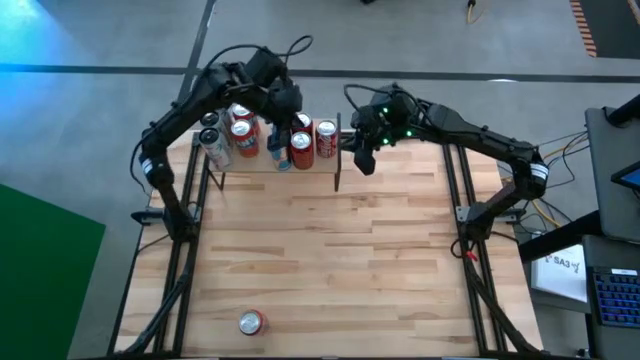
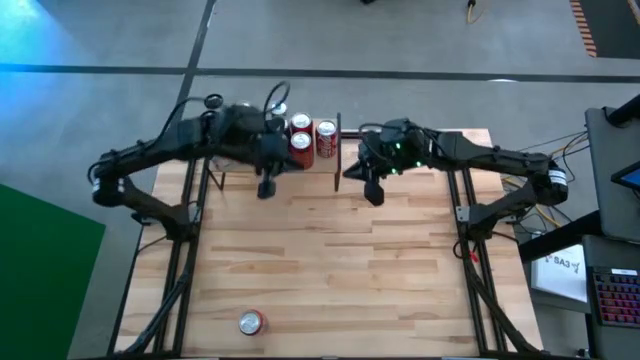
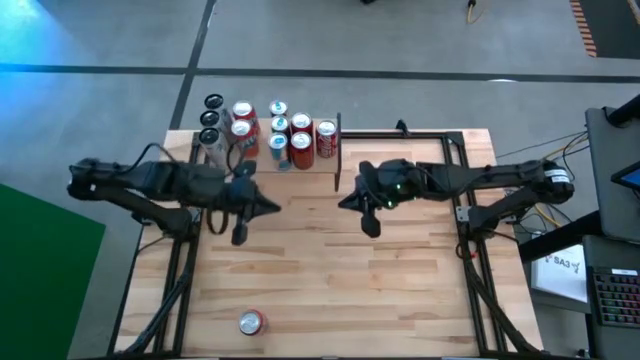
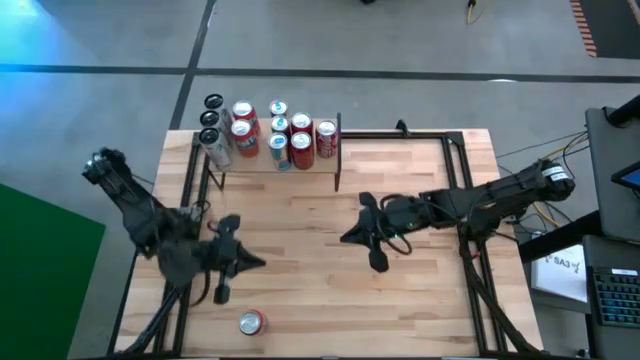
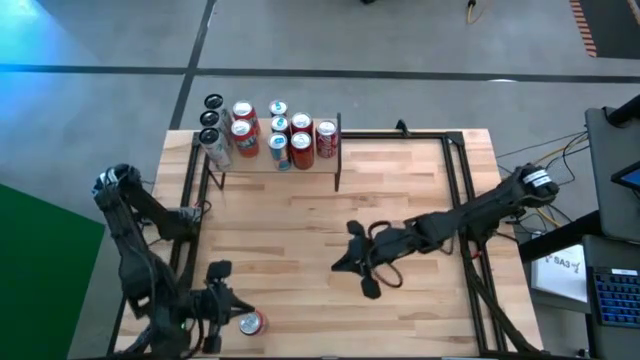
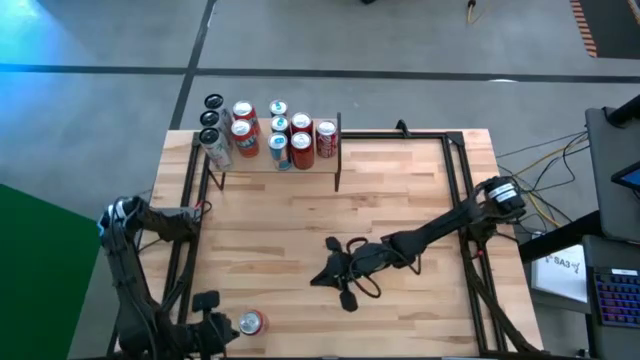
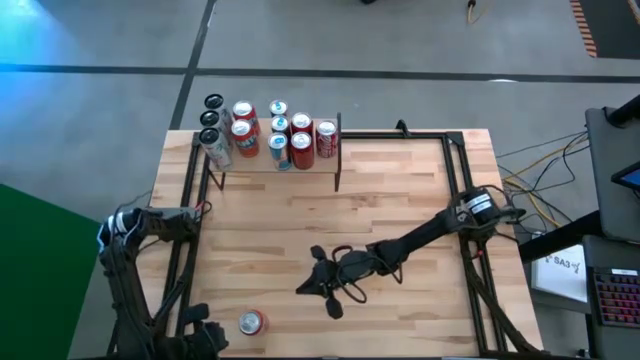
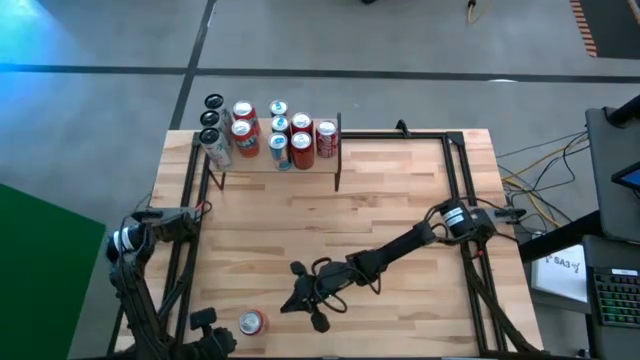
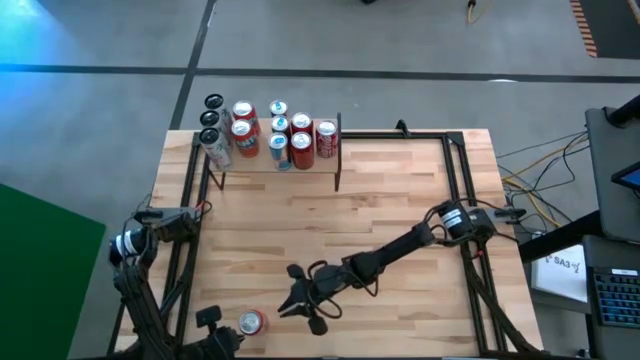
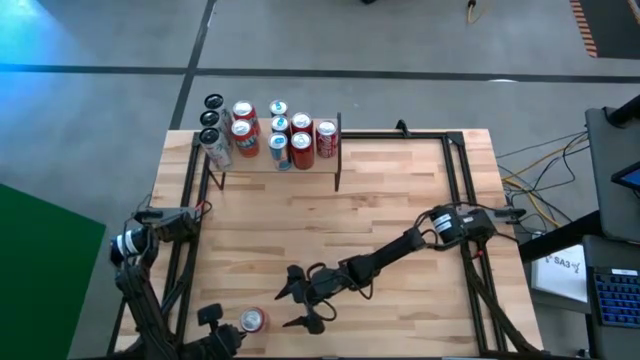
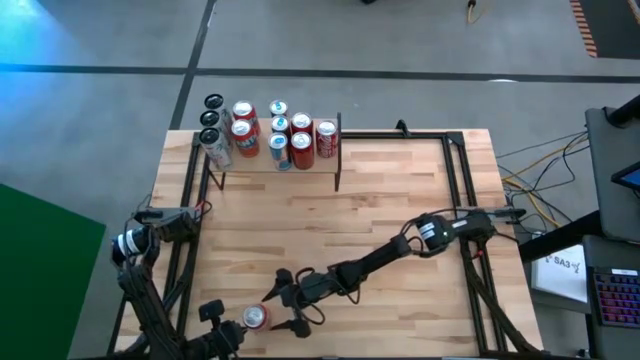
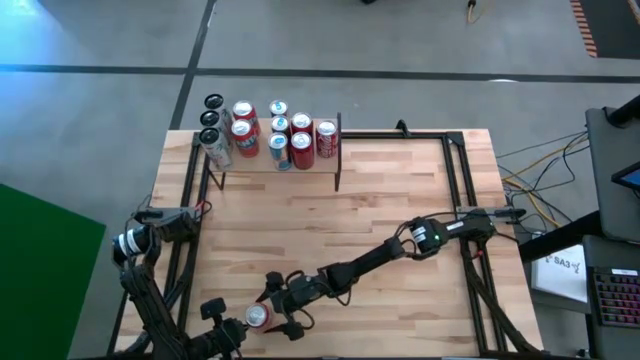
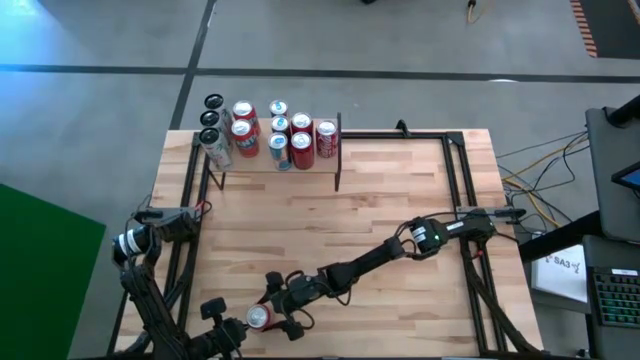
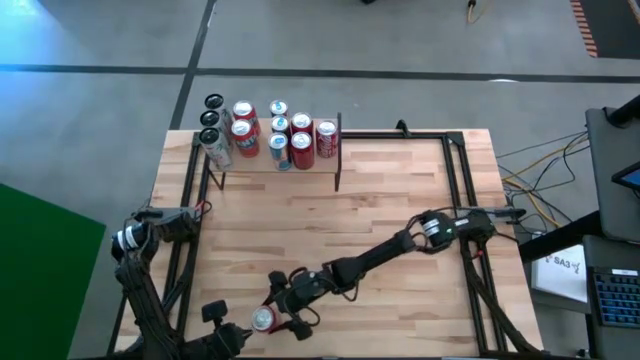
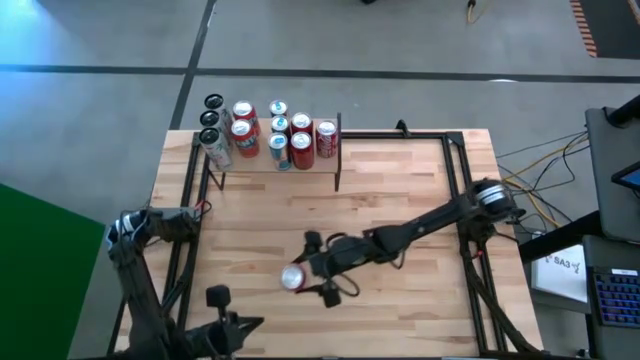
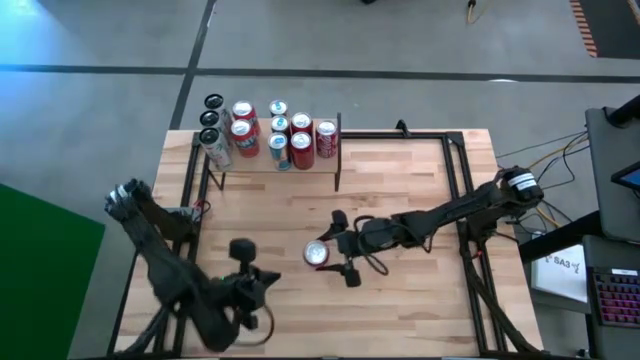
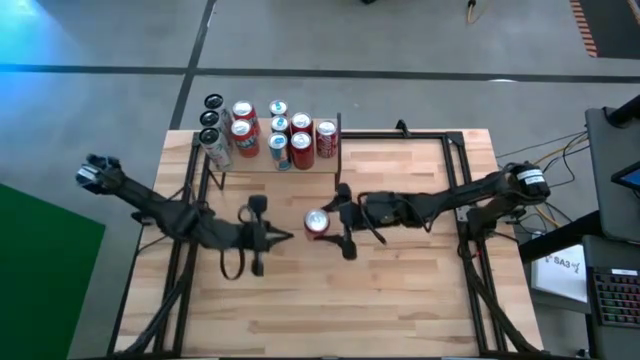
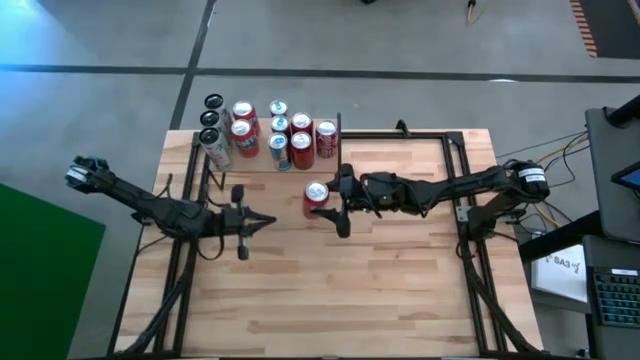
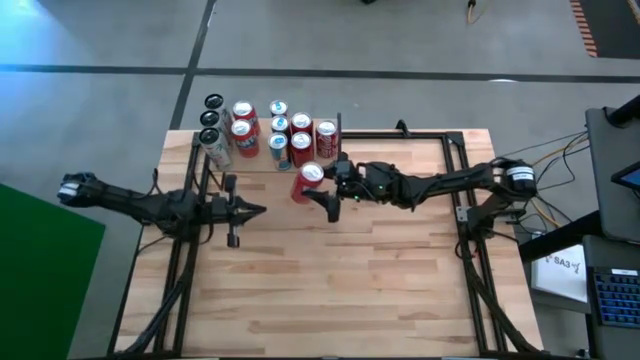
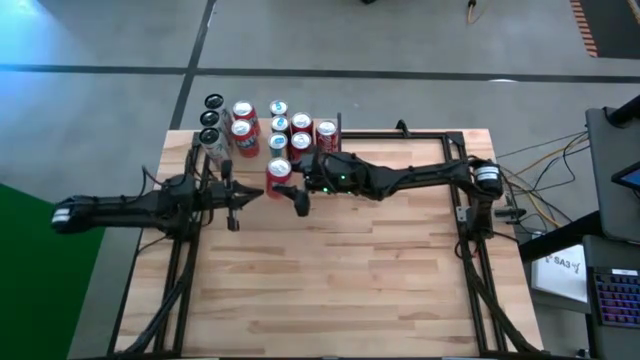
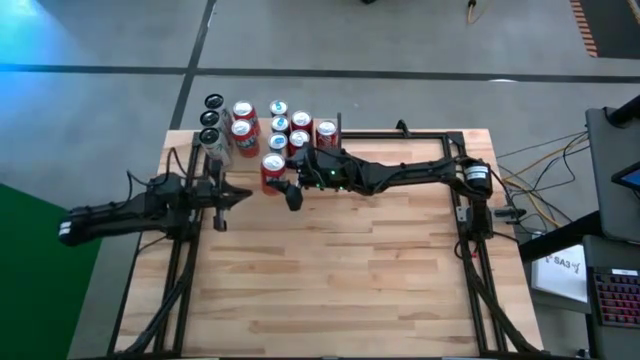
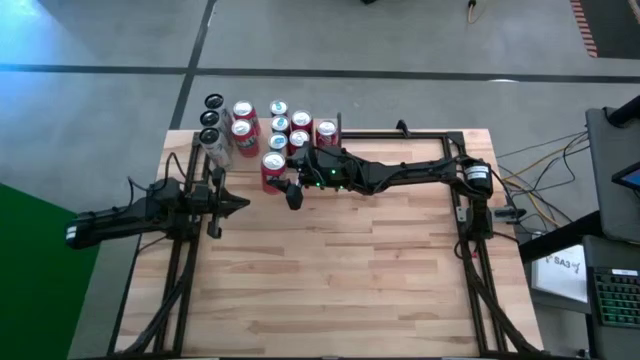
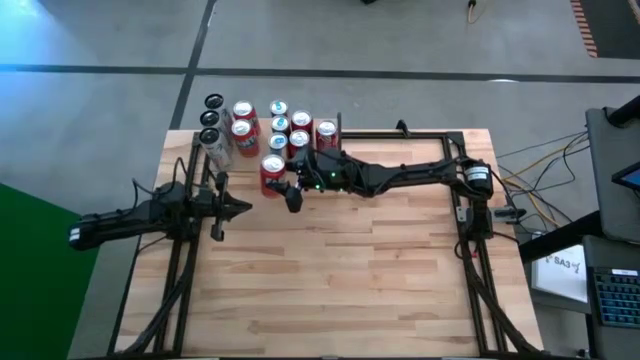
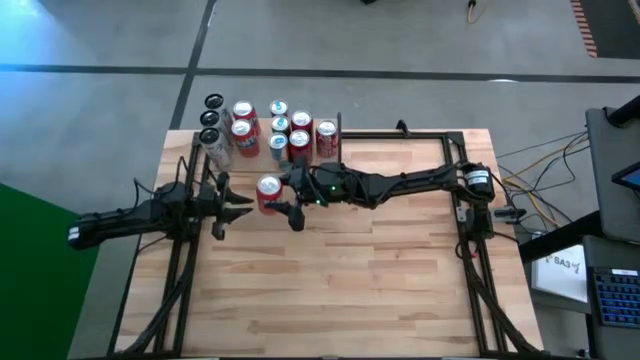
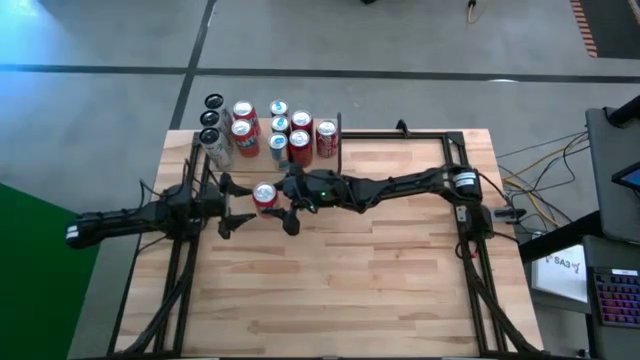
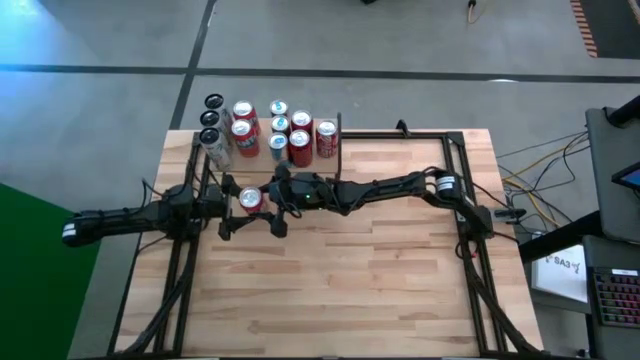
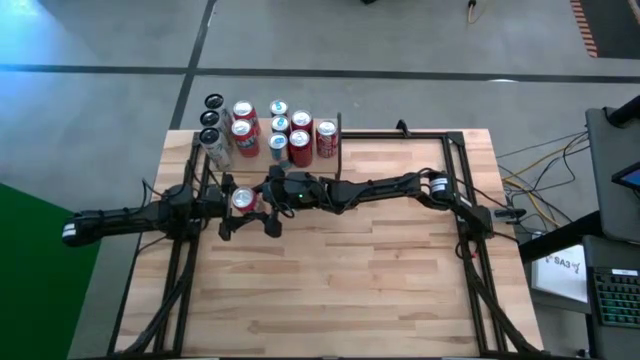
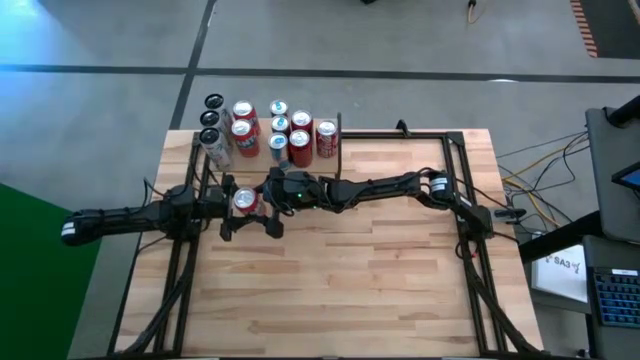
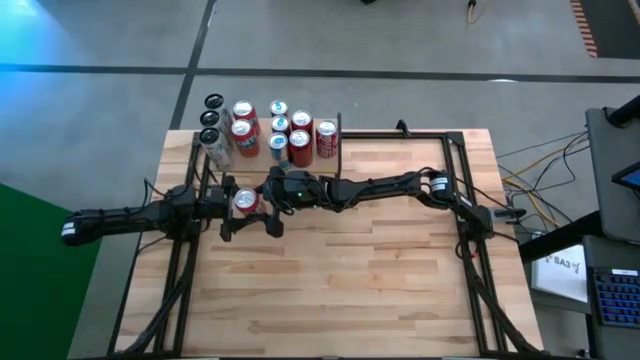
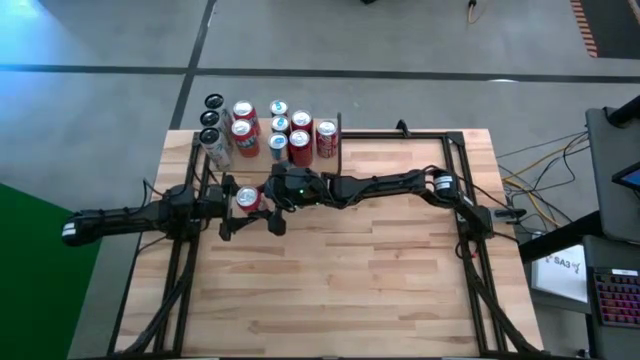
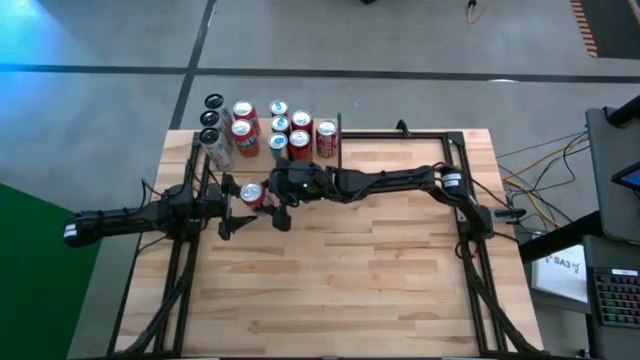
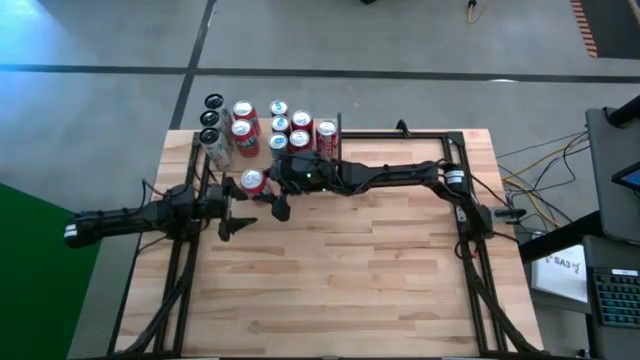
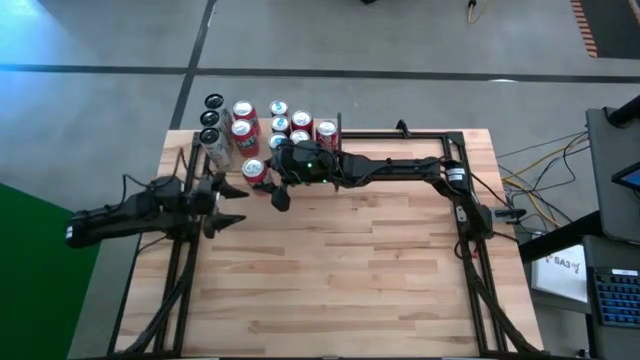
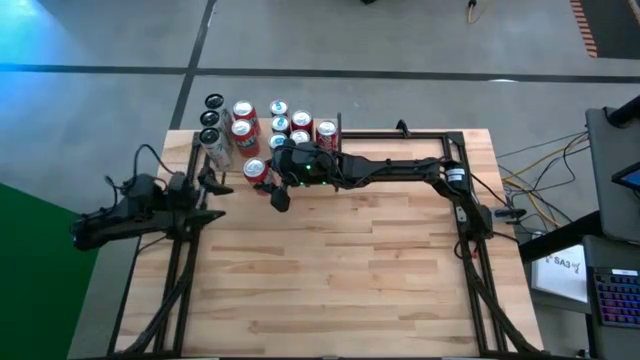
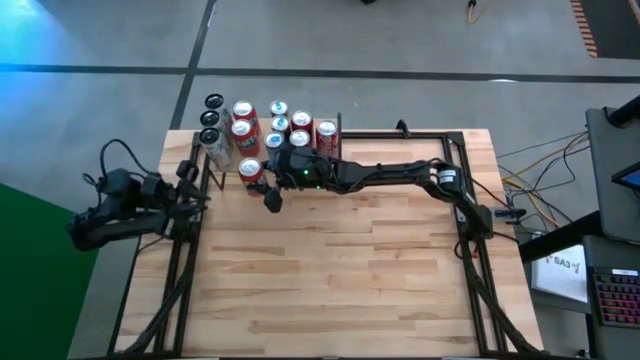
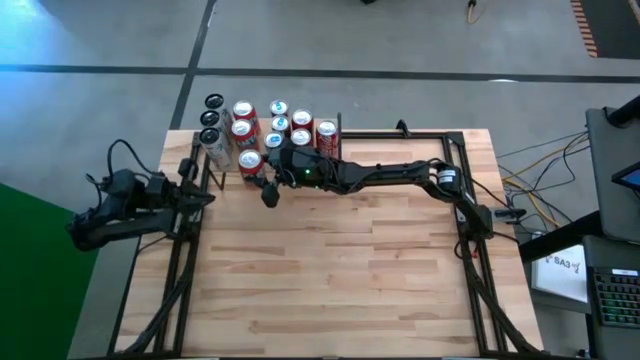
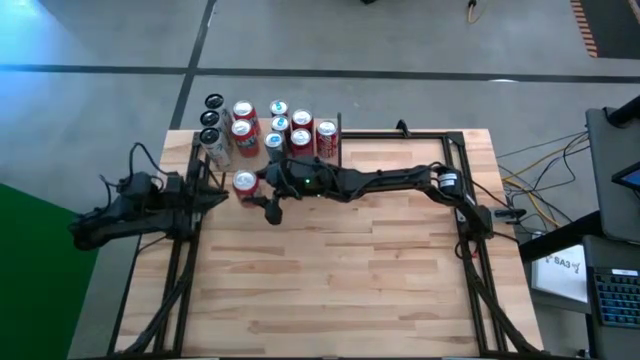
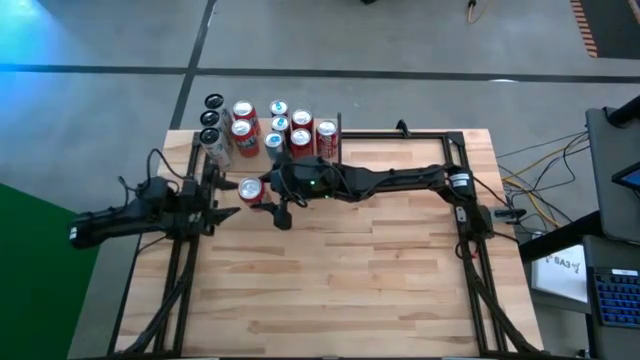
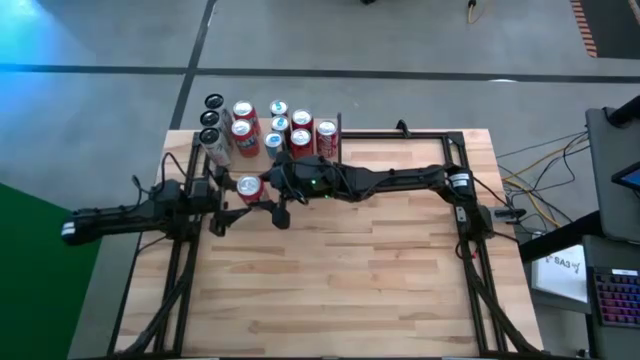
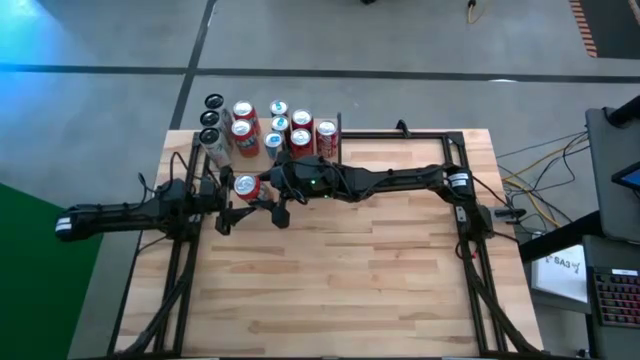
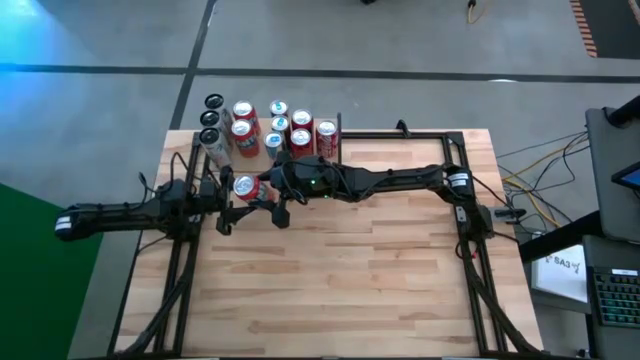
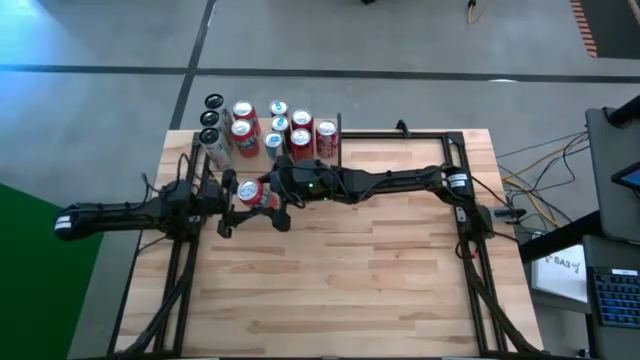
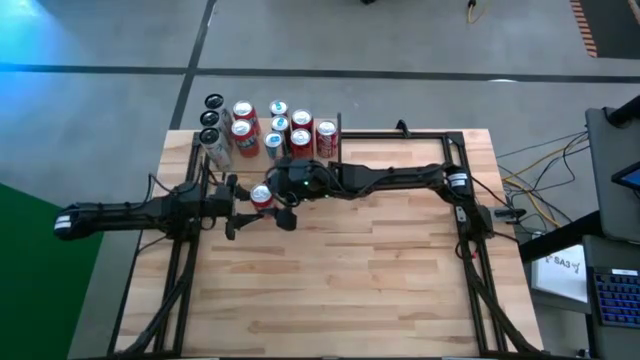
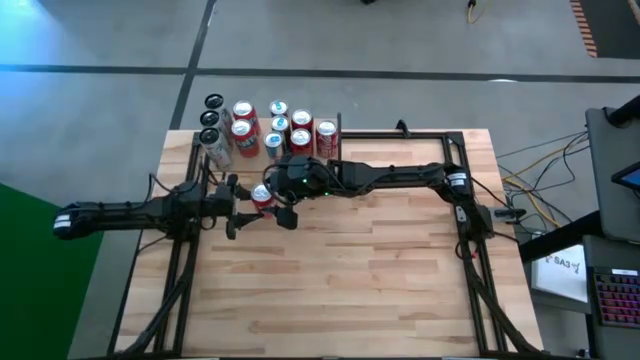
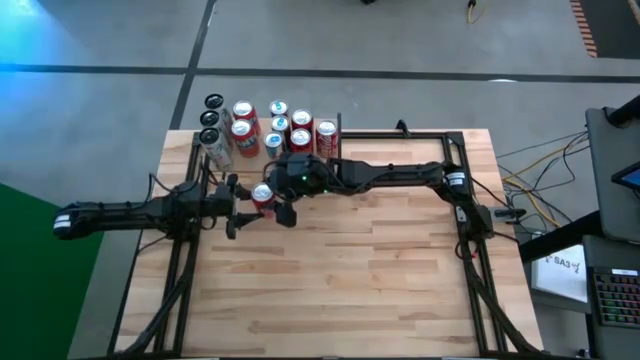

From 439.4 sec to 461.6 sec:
Task: Place canned beverage on shelf
Put the red soda can on the shelf aligned with the other red soda cans
